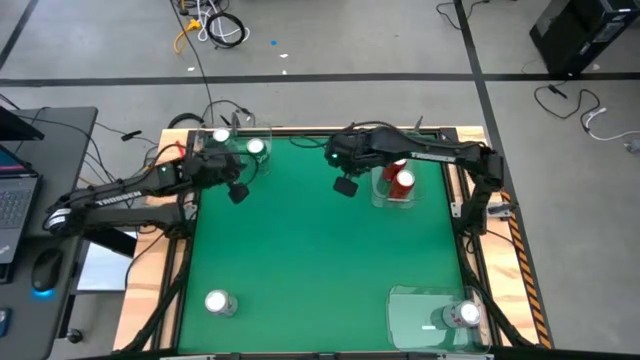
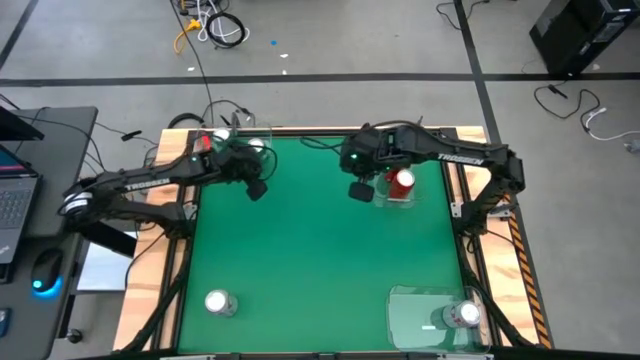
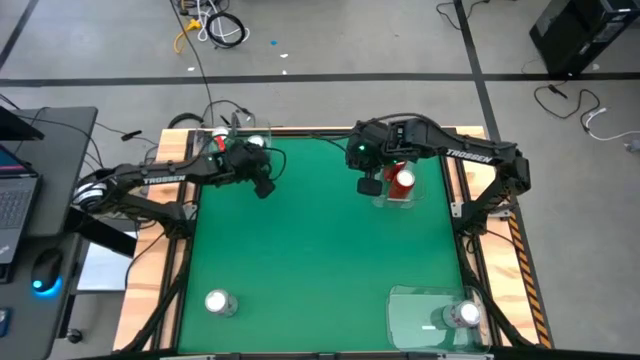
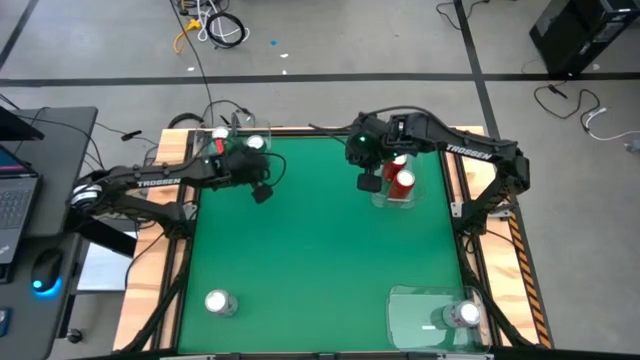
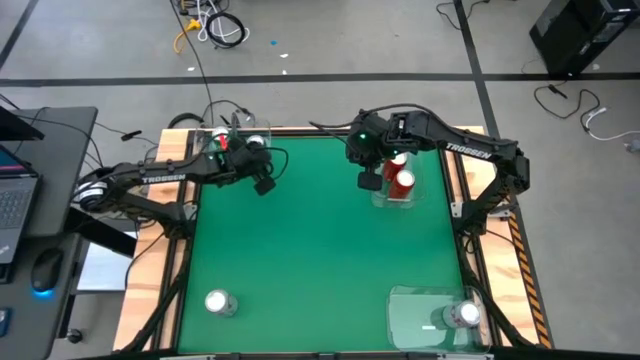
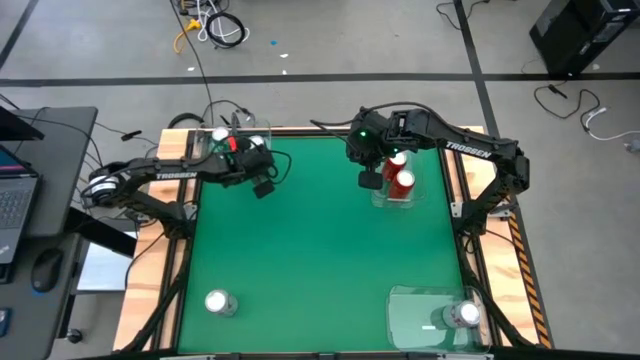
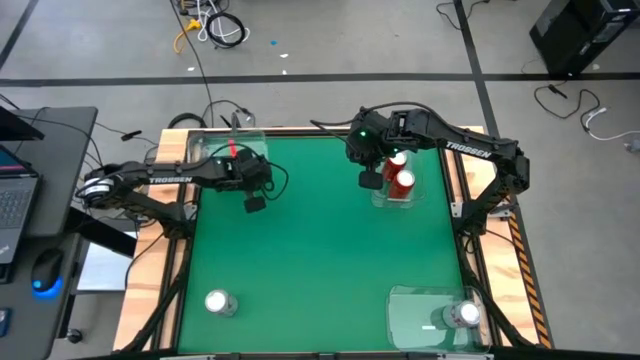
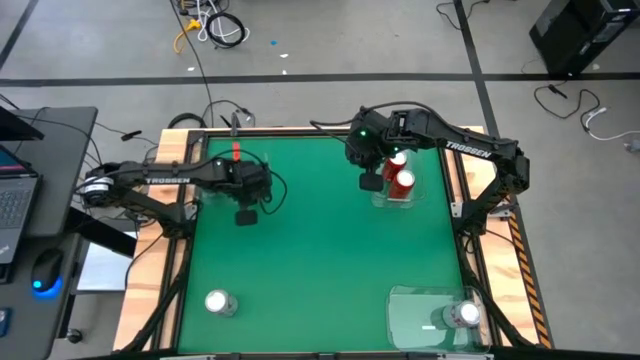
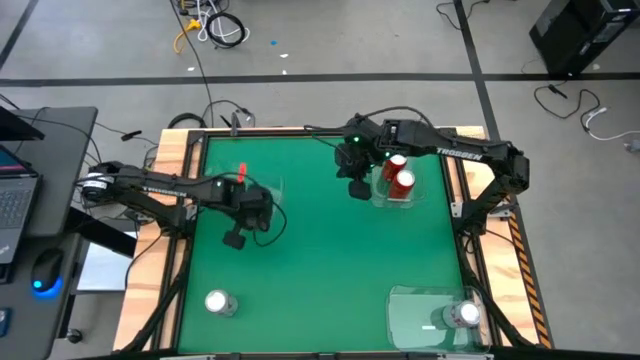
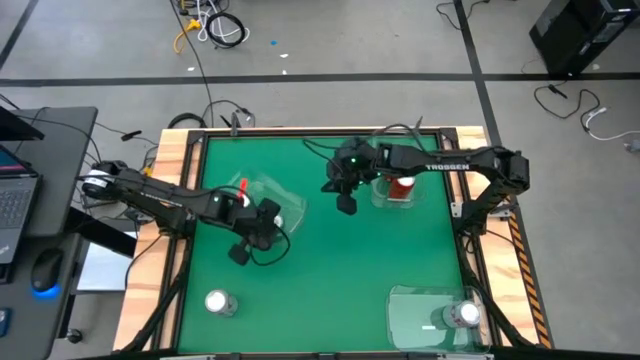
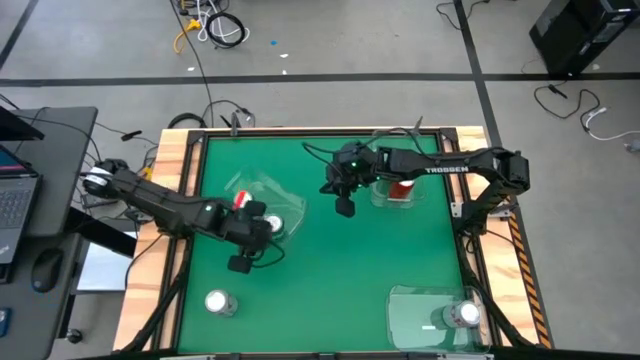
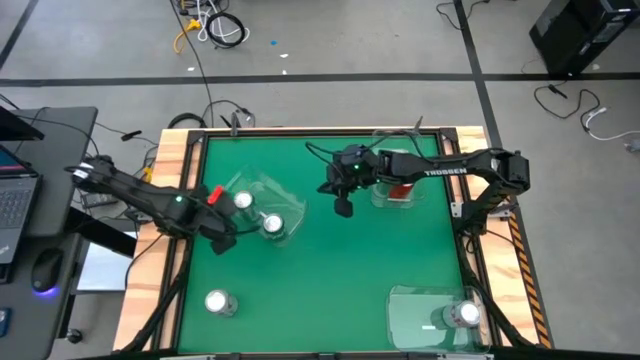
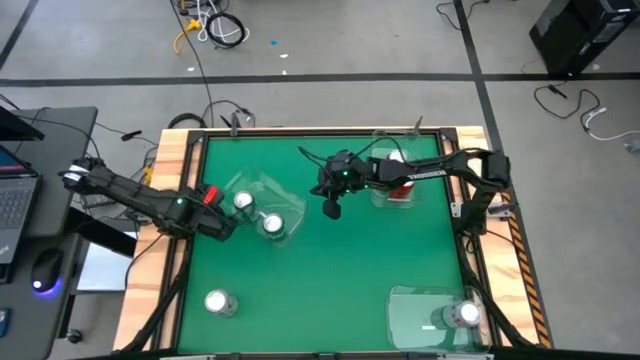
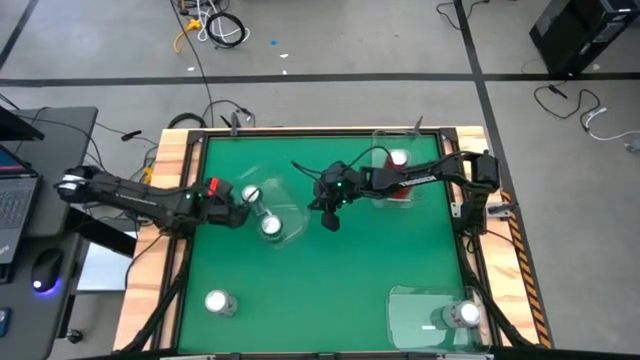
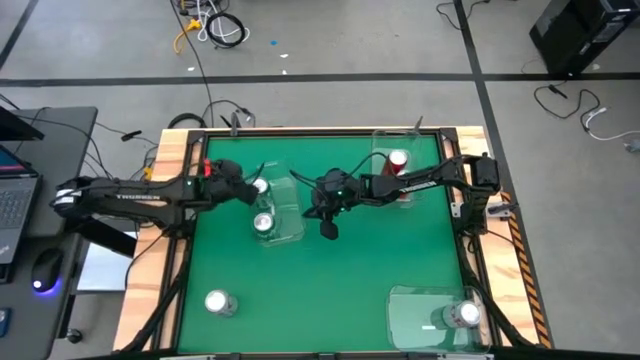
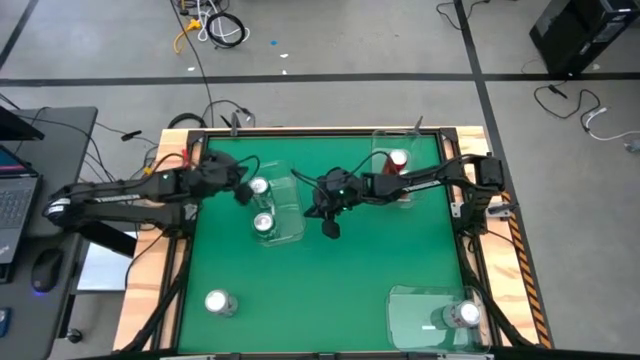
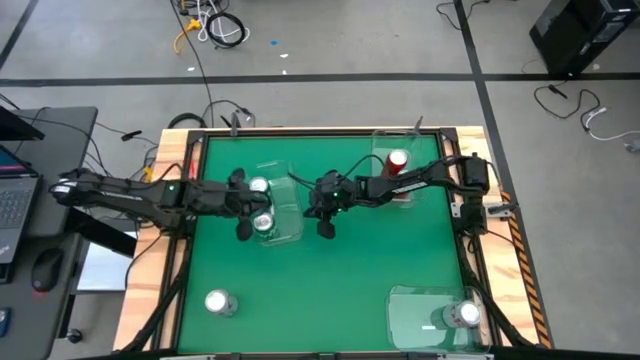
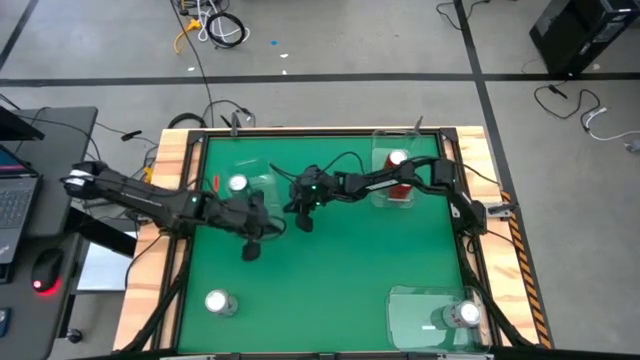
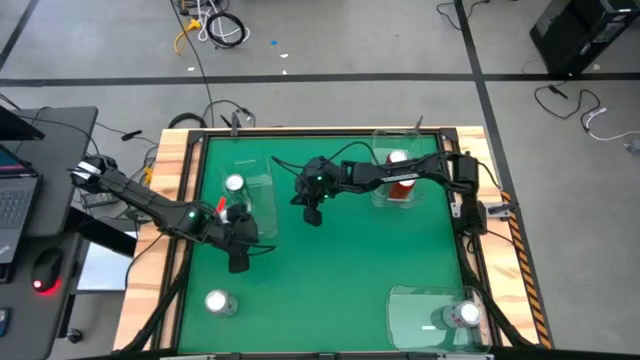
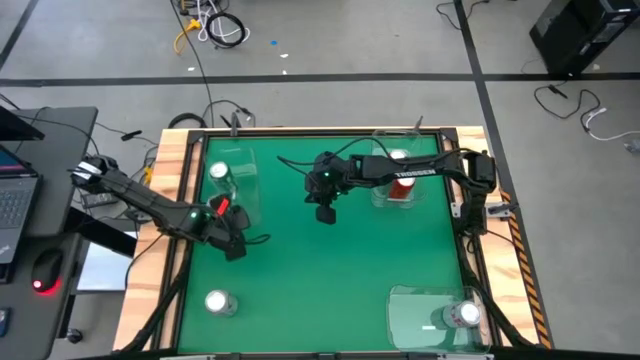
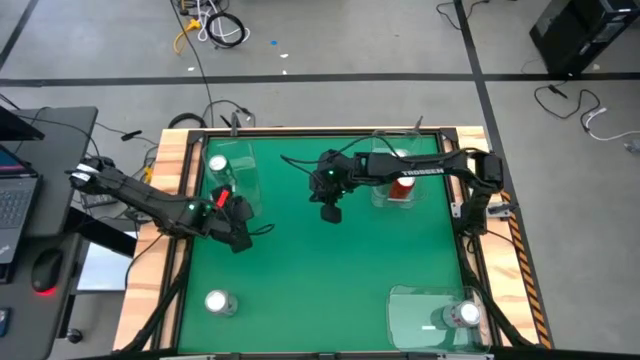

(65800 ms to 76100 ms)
Task: Sort soda cans
Adjust the top left transparent bin

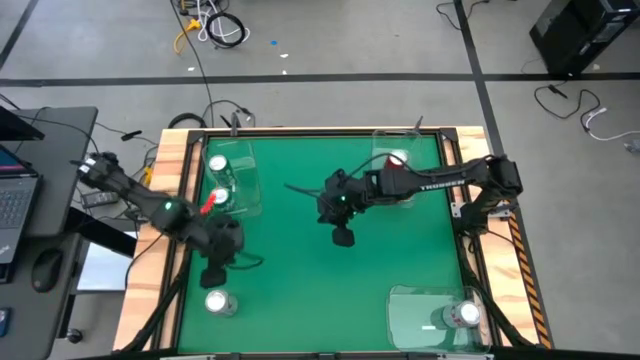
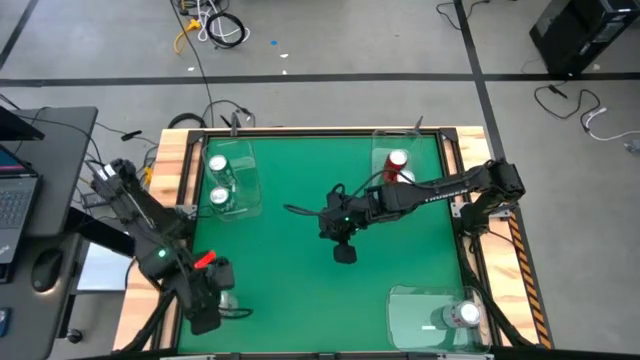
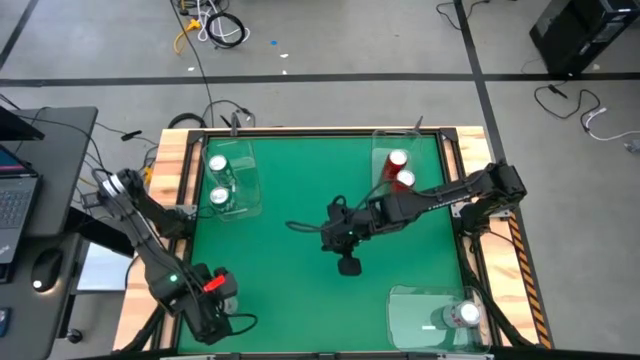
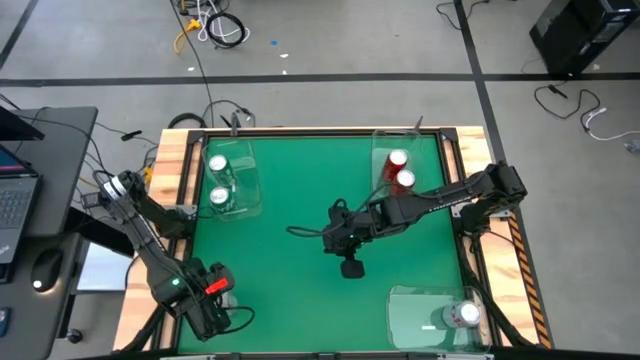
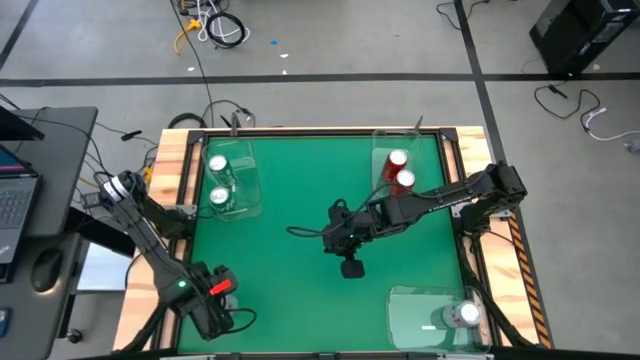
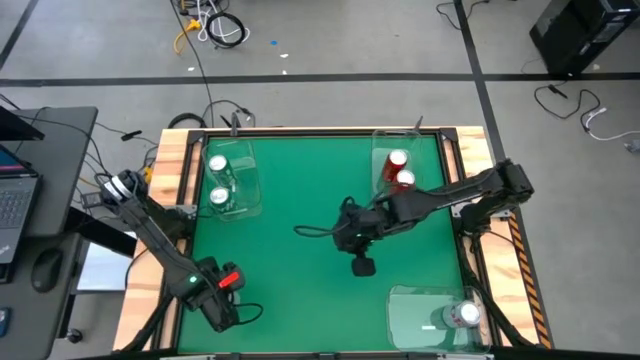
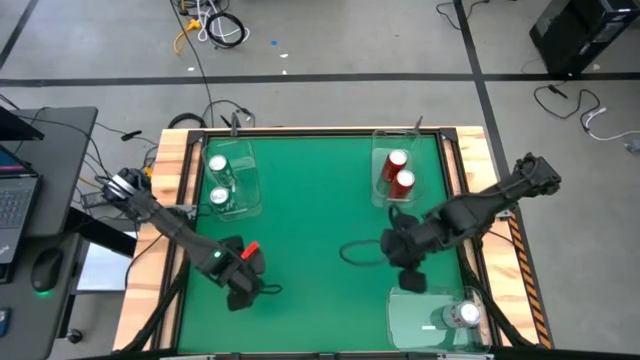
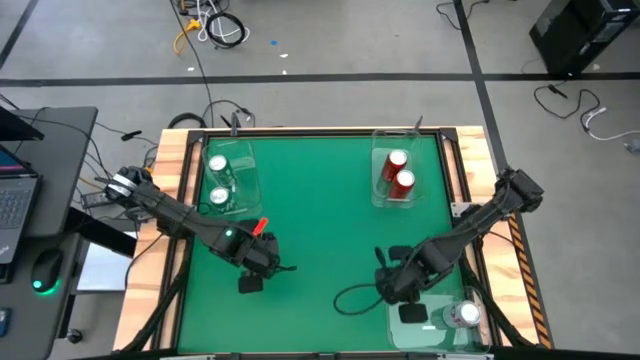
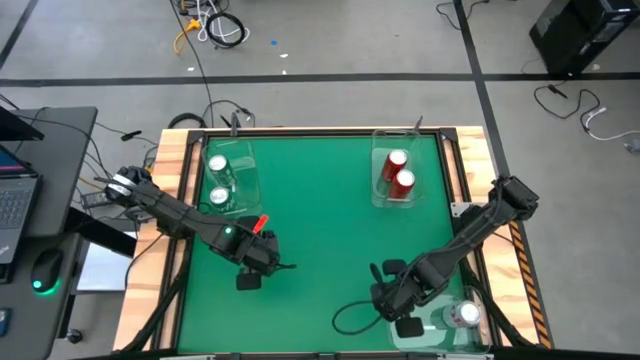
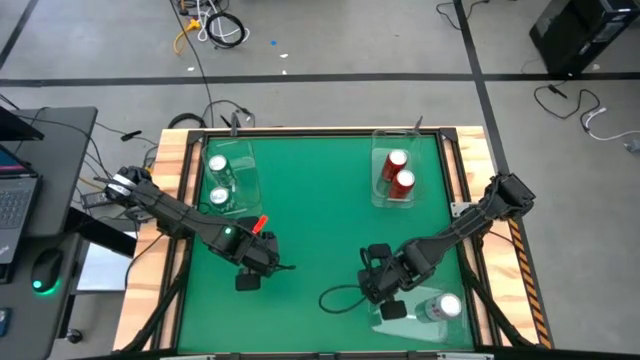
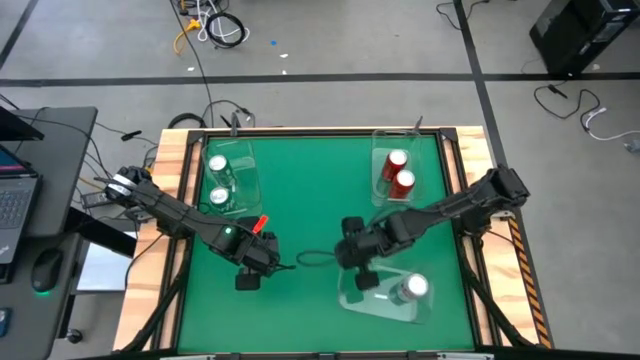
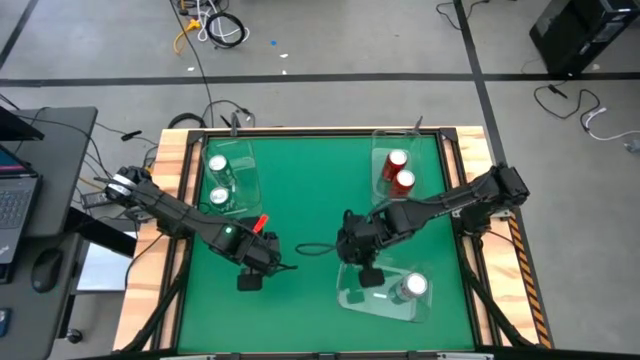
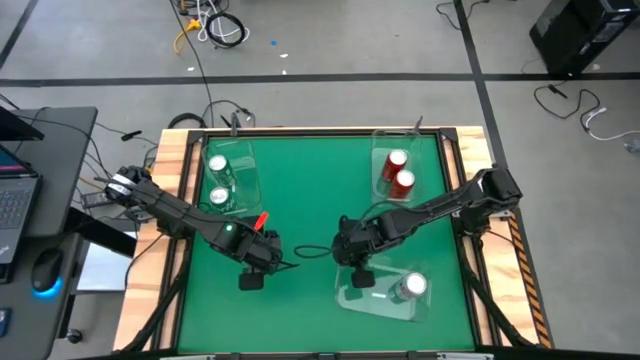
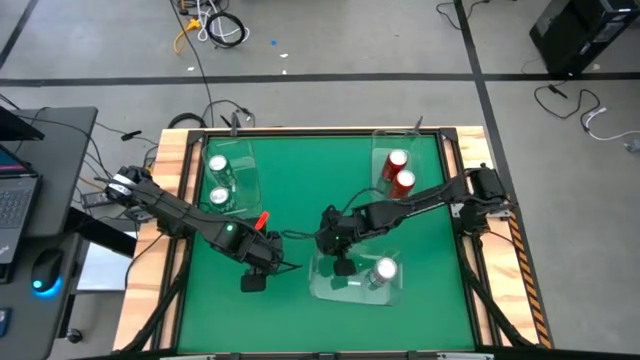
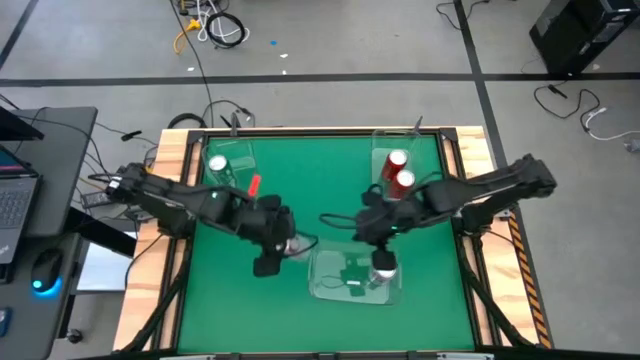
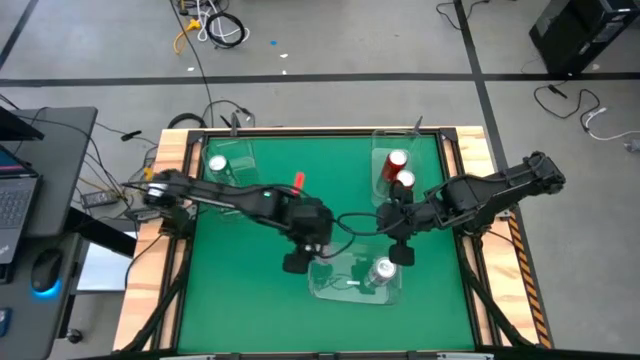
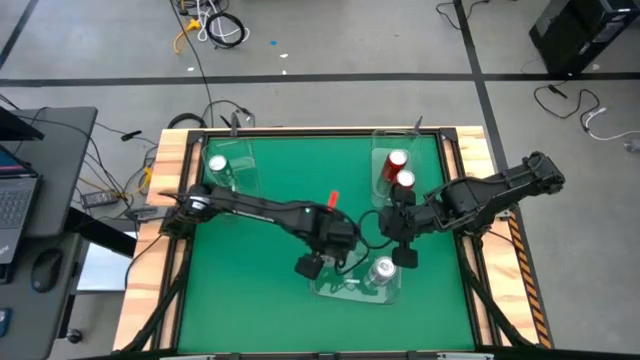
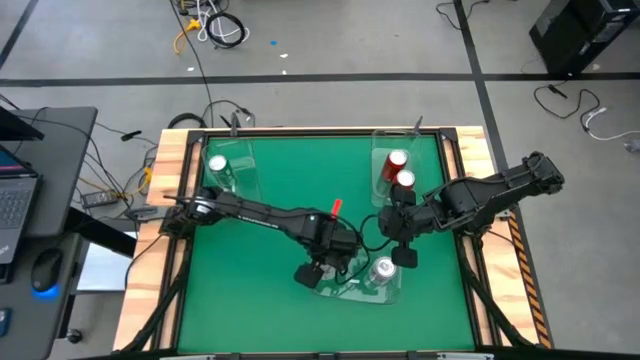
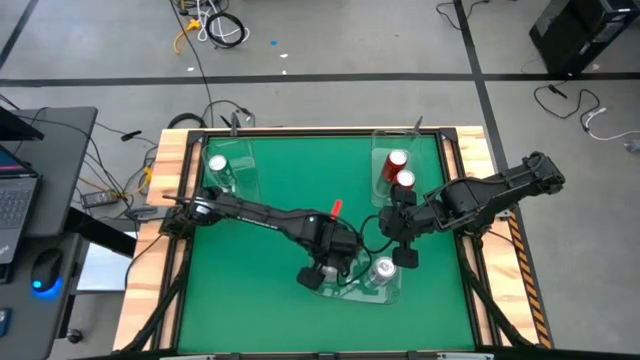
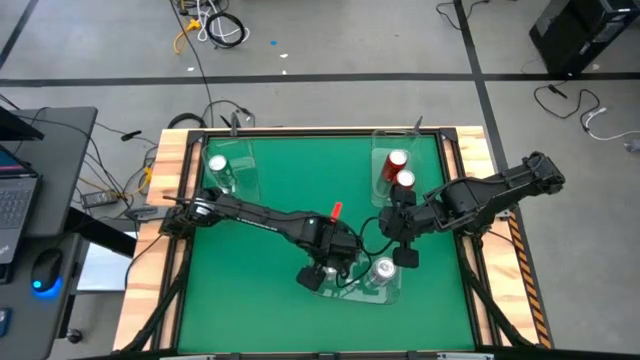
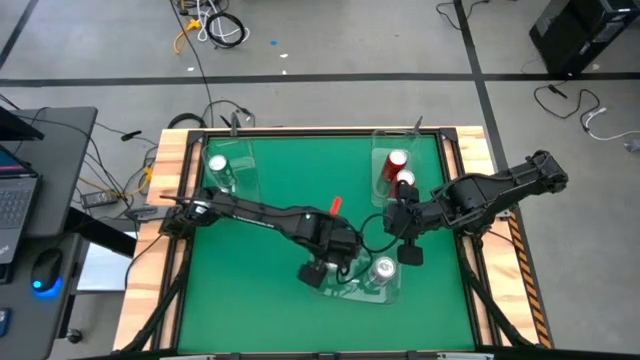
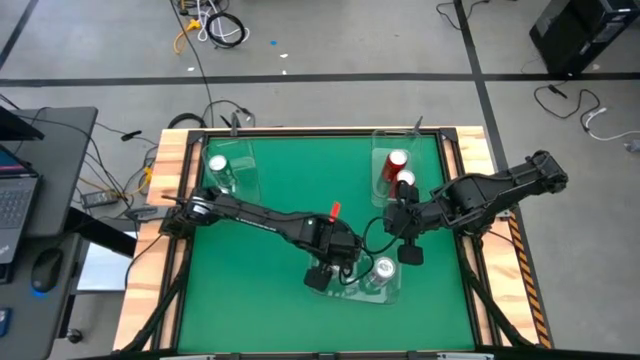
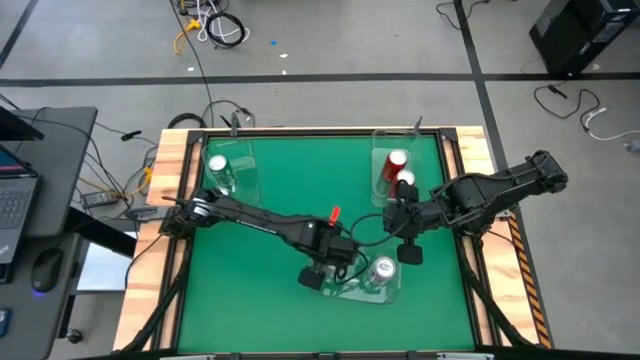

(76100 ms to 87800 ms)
Put the red-silver soda can into the bottom transparent bin
